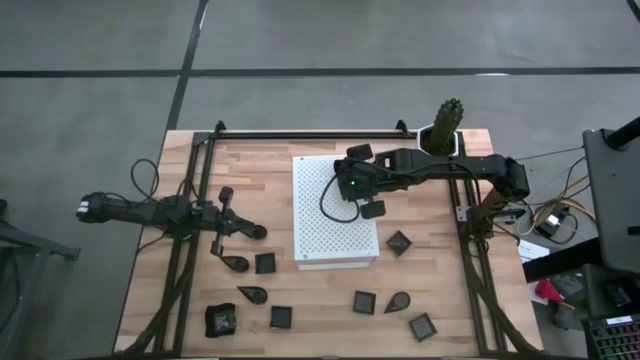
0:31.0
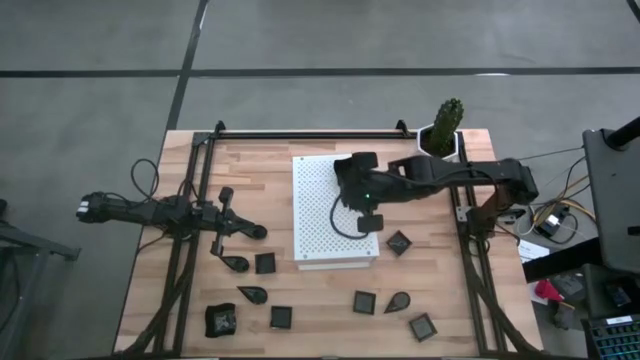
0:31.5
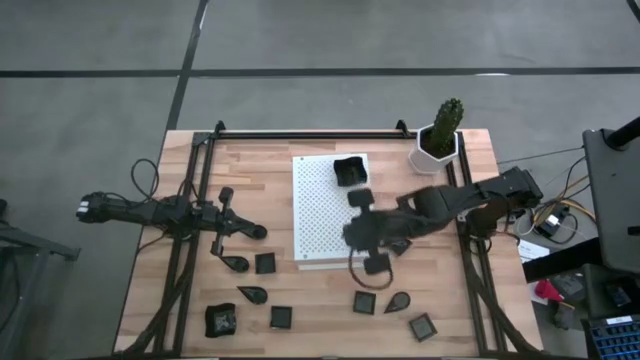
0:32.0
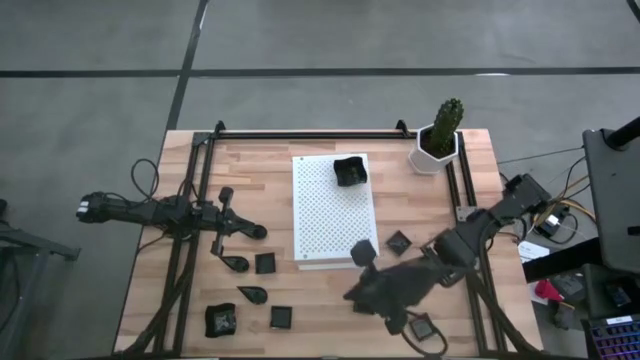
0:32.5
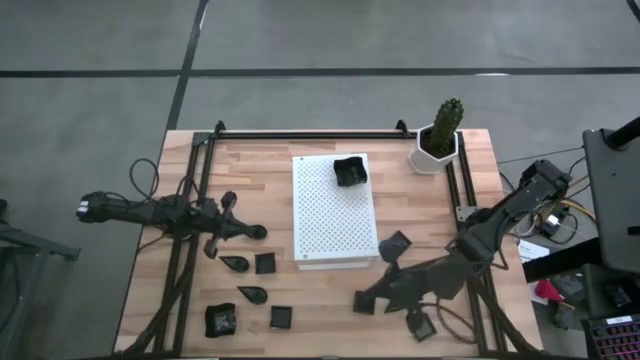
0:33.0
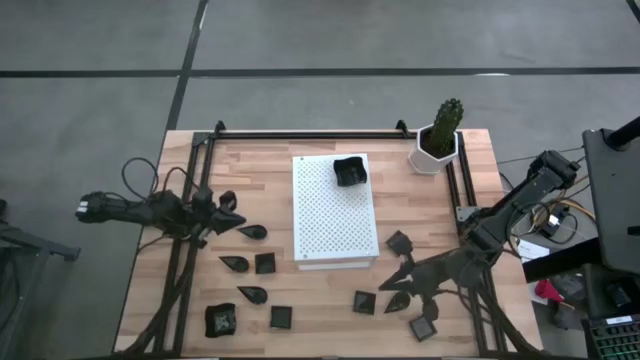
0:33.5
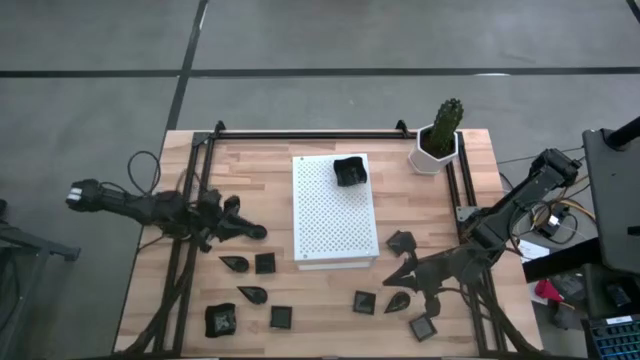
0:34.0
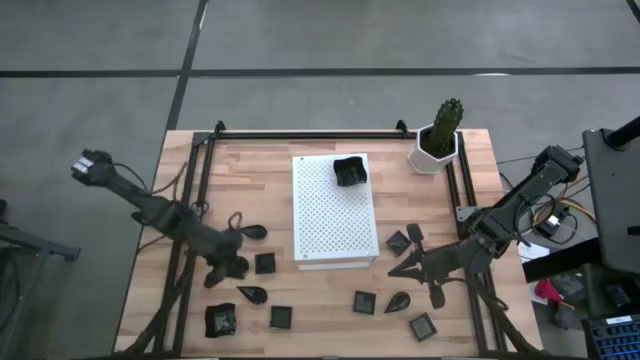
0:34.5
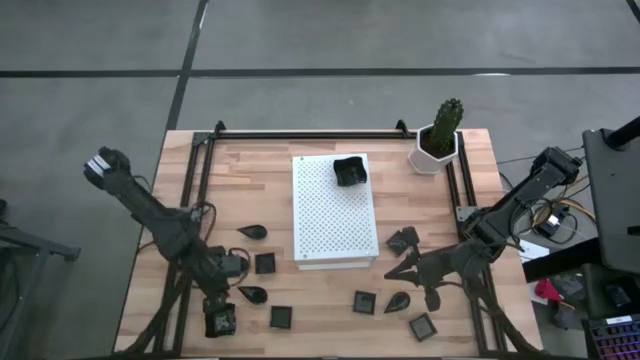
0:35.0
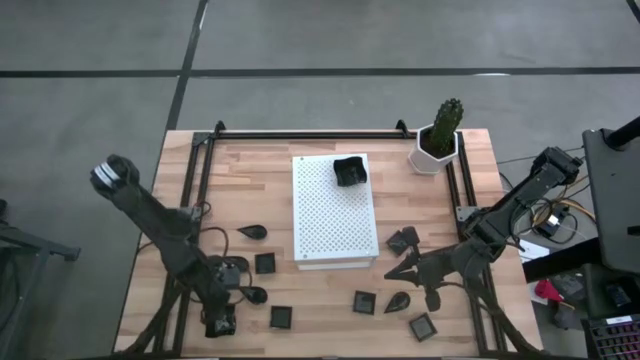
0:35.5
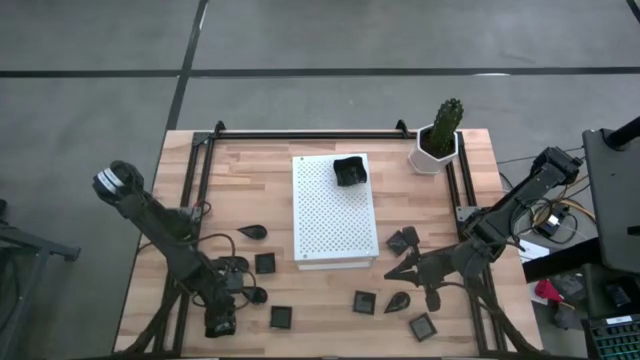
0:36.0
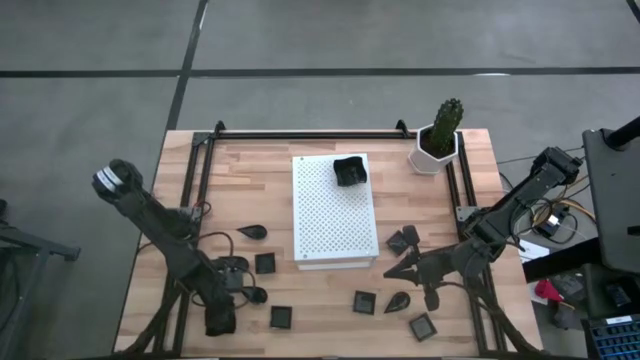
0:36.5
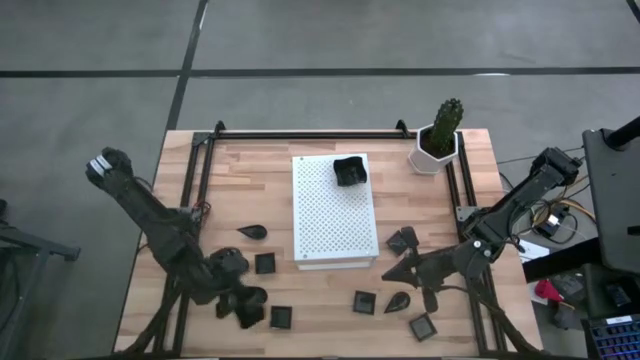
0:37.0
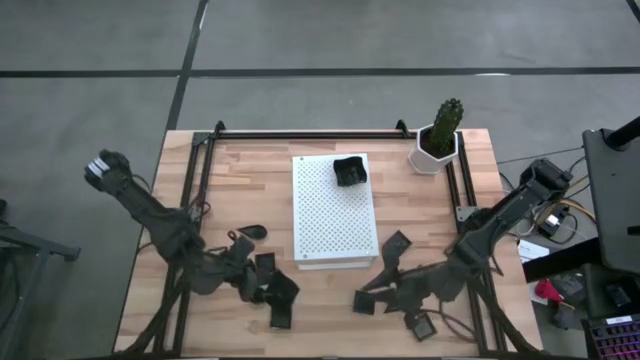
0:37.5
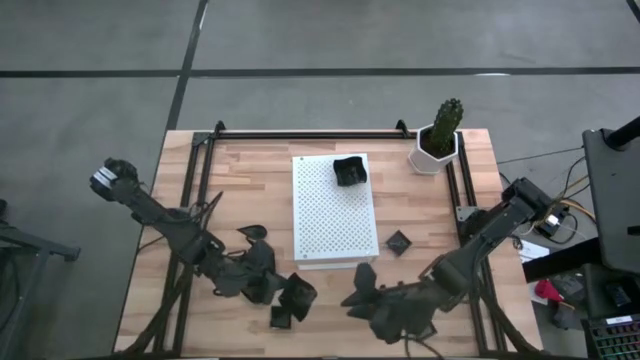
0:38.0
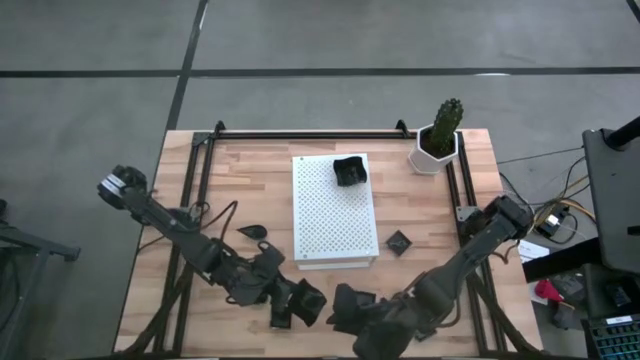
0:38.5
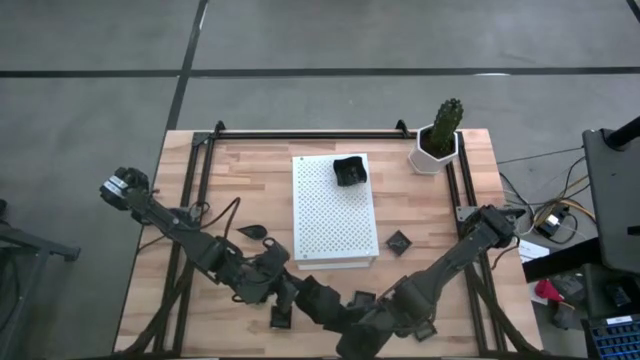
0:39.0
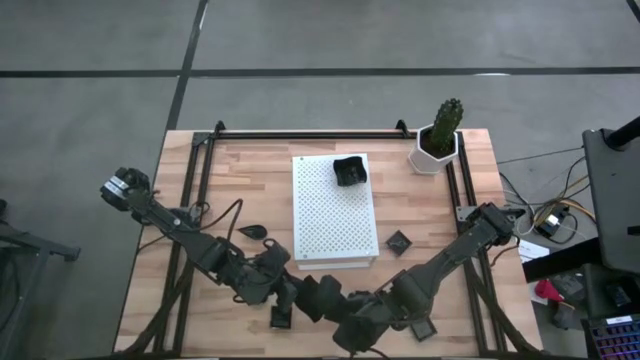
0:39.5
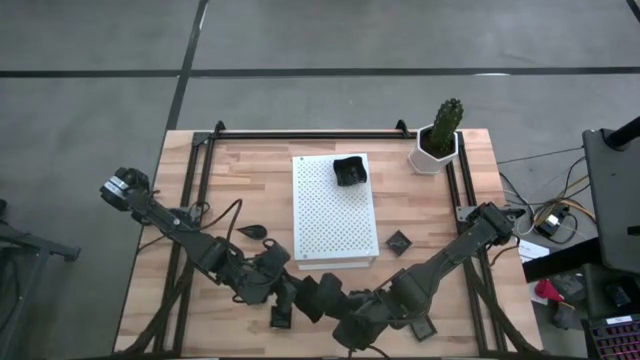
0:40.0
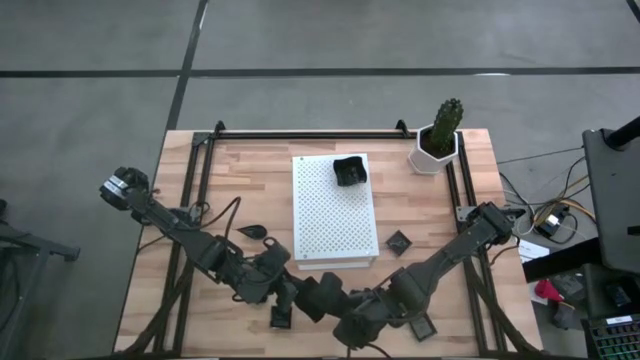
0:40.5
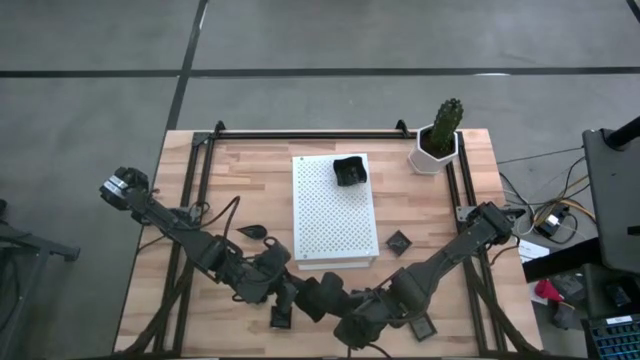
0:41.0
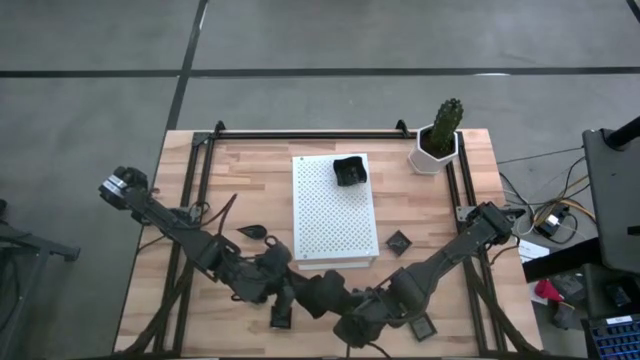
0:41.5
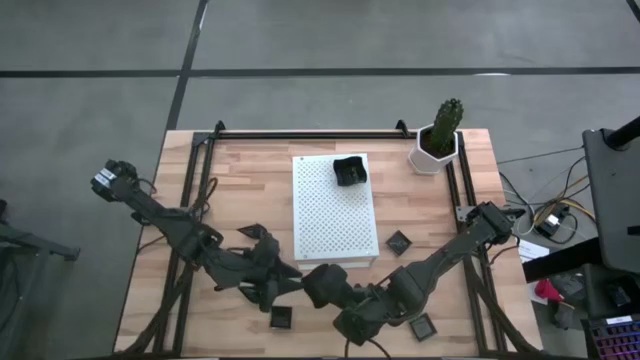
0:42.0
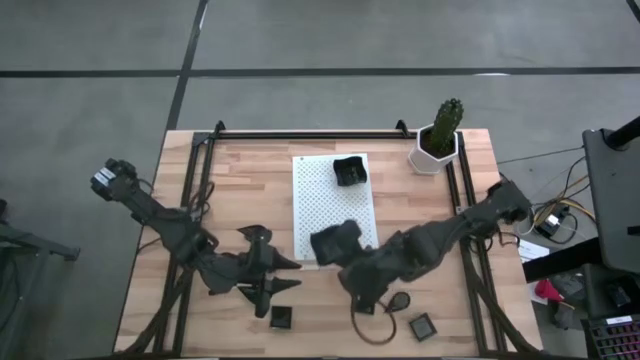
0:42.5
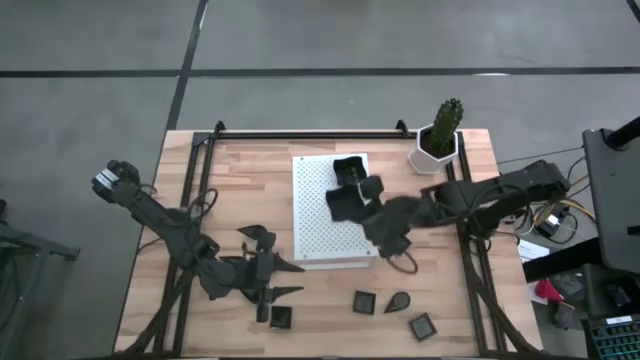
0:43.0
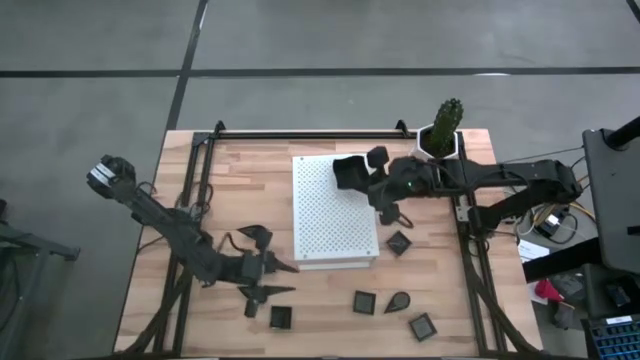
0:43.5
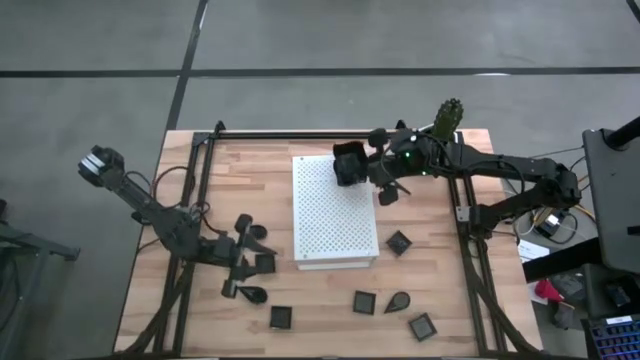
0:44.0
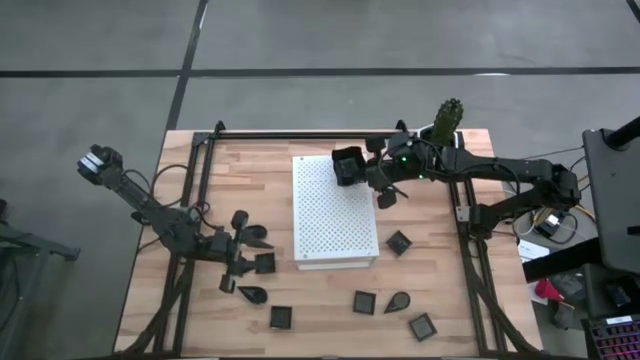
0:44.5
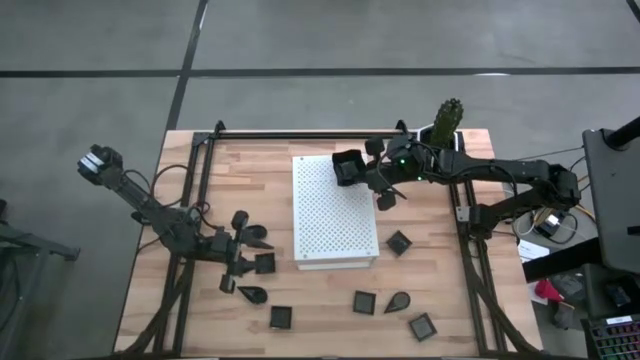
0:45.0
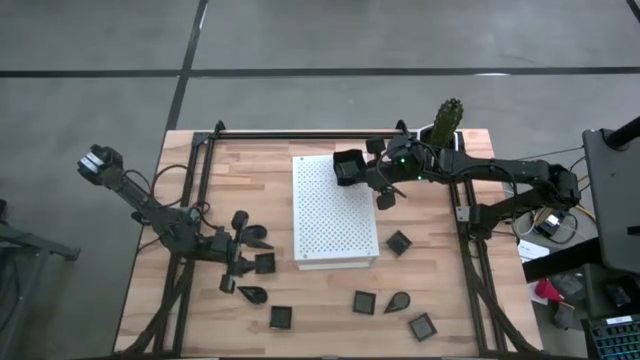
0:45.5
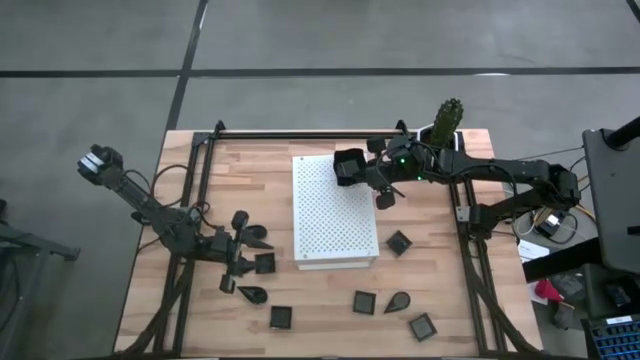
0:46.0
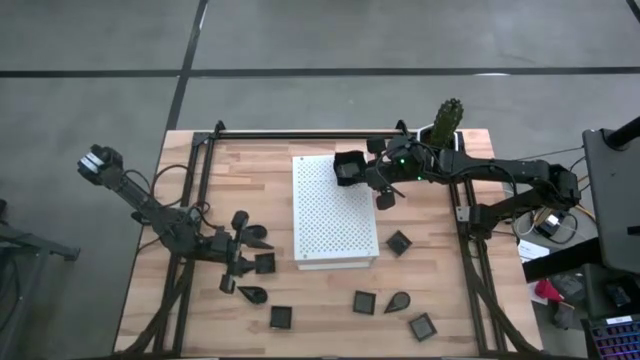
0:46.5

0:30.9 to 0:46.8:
Task: Pick & Place Mini shaped plates
Stack the black distorted square plate on top of the black distorted square plate on the shelf

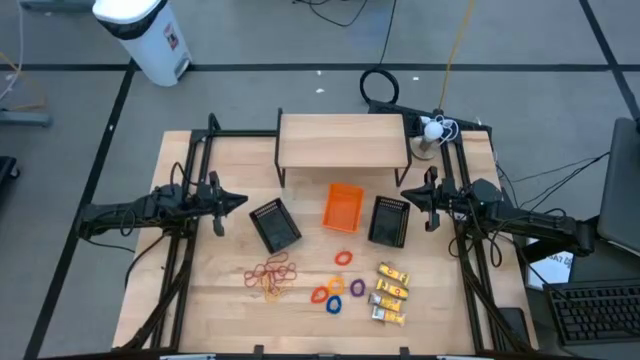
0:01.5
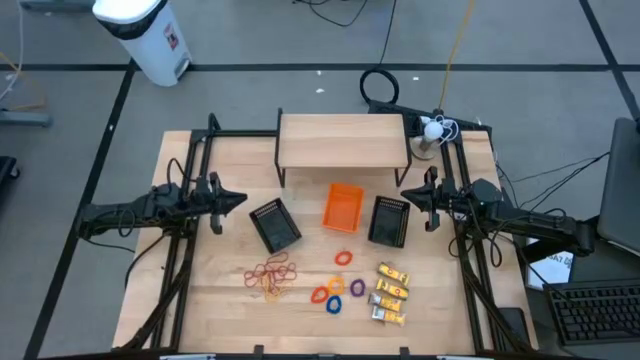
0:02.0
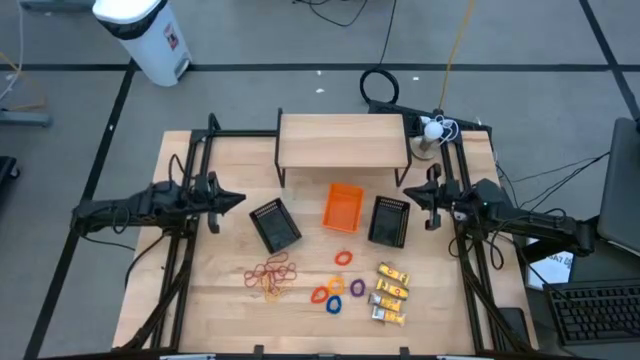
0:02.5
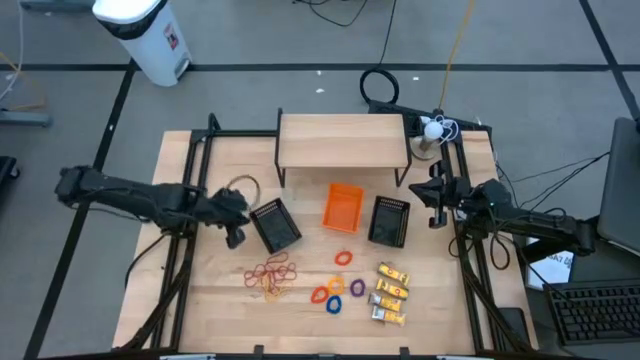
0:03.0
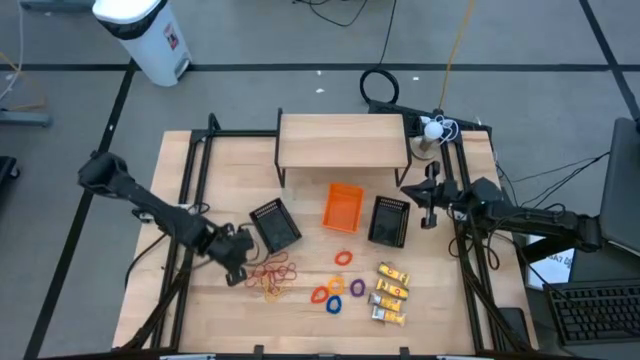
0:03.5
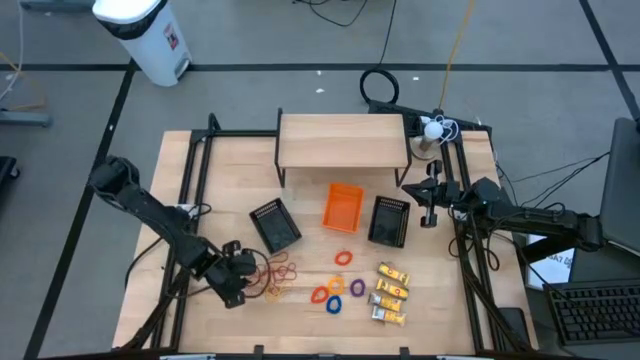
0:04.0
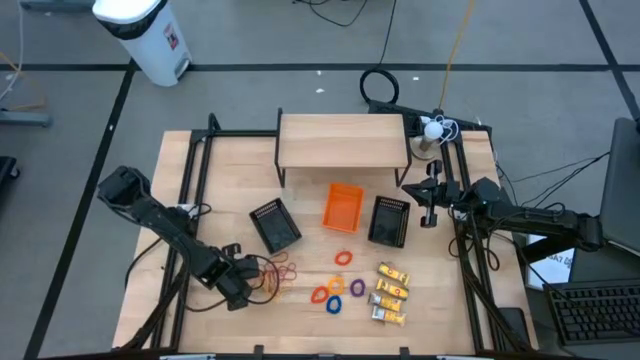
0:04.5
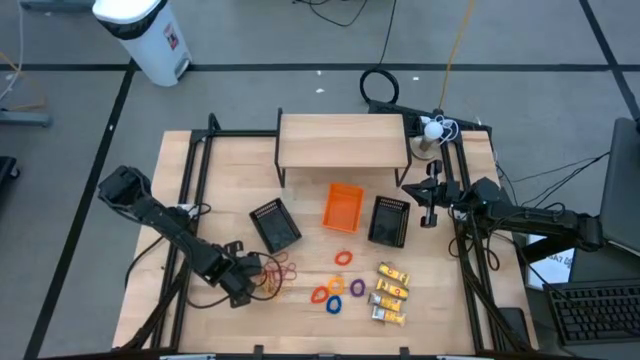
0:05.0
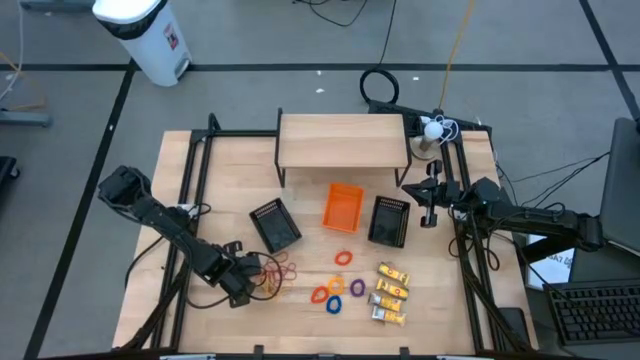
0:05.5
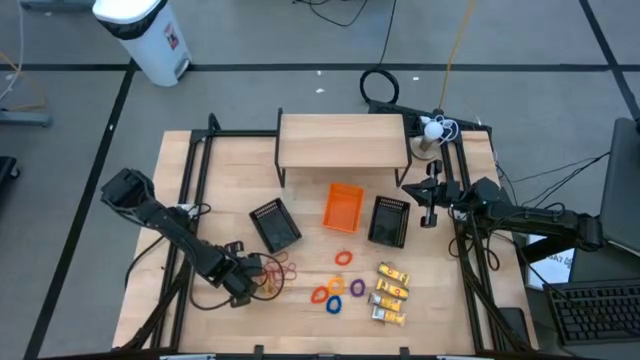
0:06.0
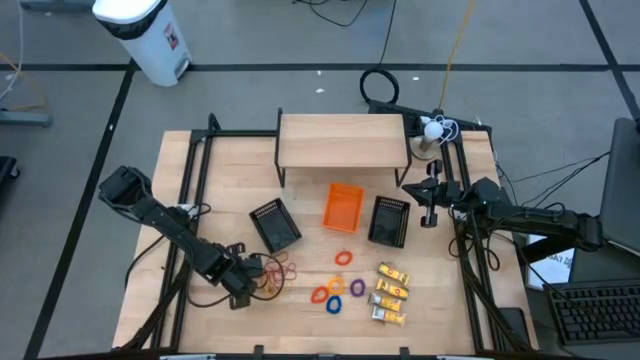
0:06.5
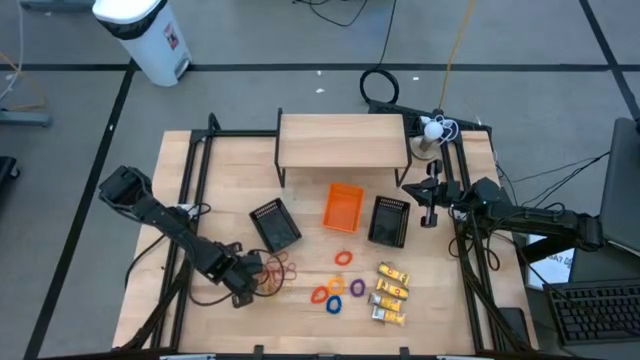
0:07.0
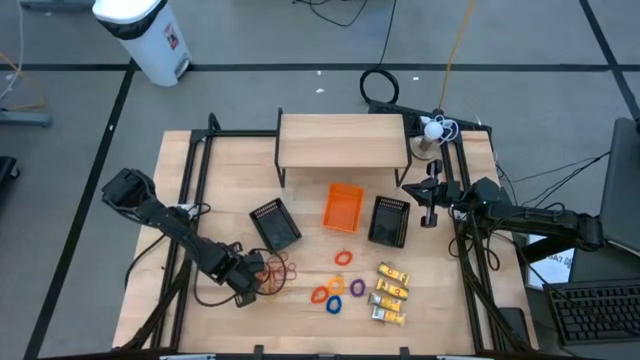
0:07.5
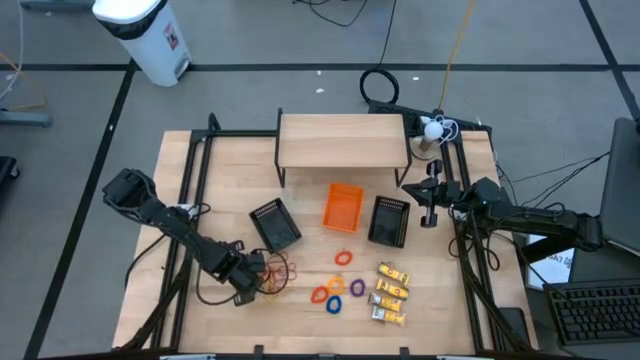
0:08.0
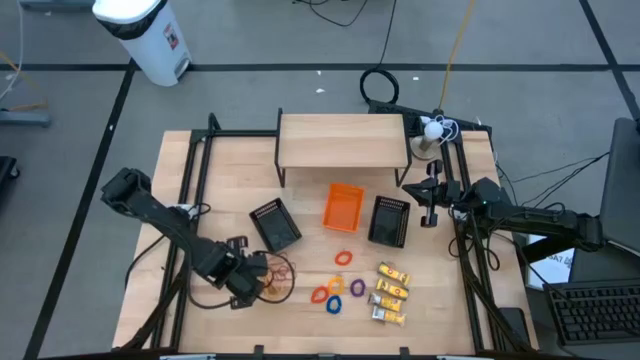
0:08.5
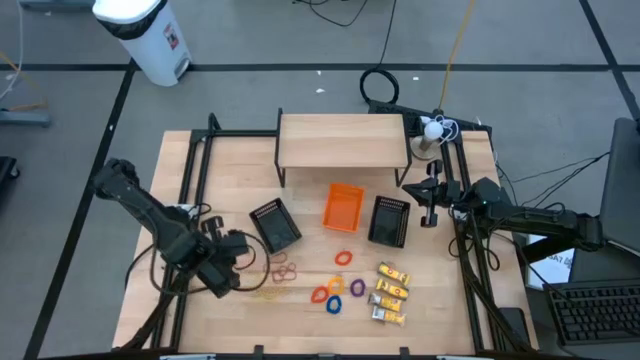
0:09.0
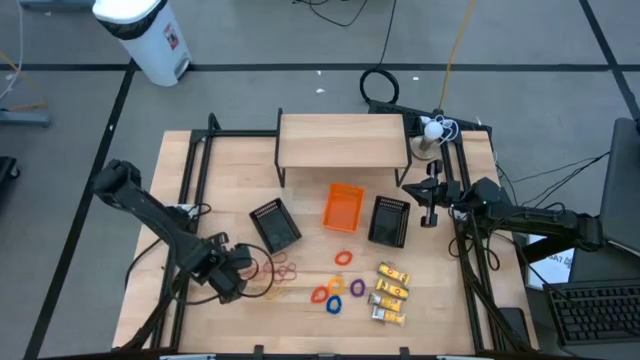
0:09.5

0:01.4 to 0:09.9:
Task: Pick & Place Office Desk Supplies
Put the red rubber band into the left black bin
